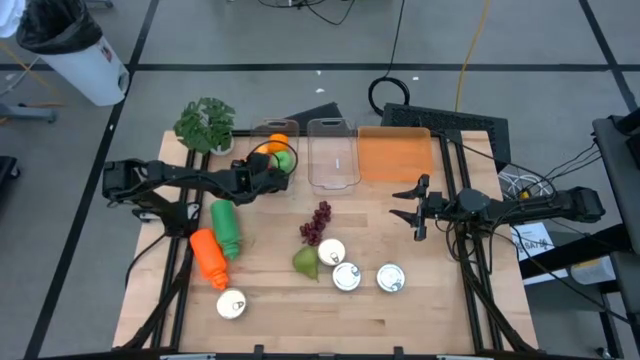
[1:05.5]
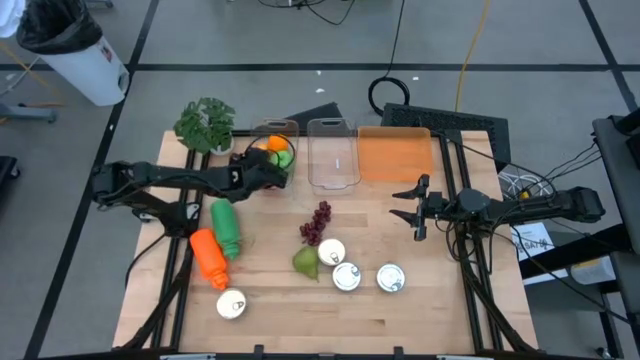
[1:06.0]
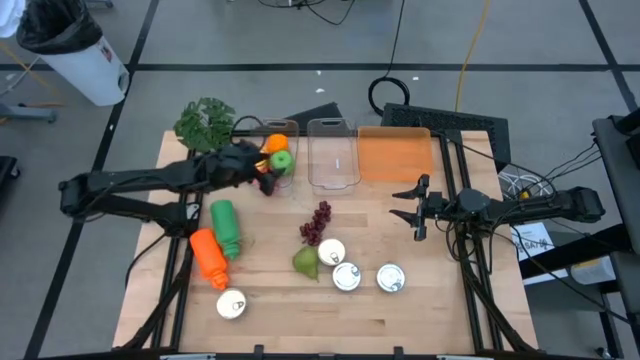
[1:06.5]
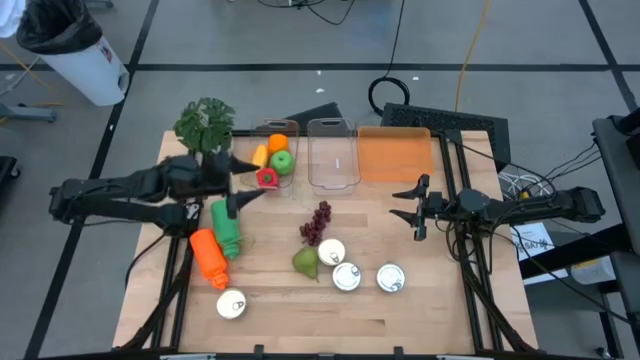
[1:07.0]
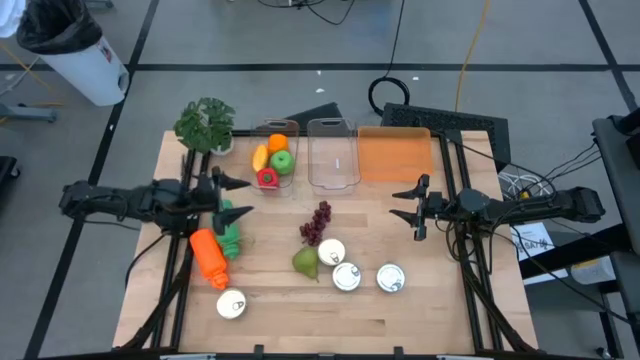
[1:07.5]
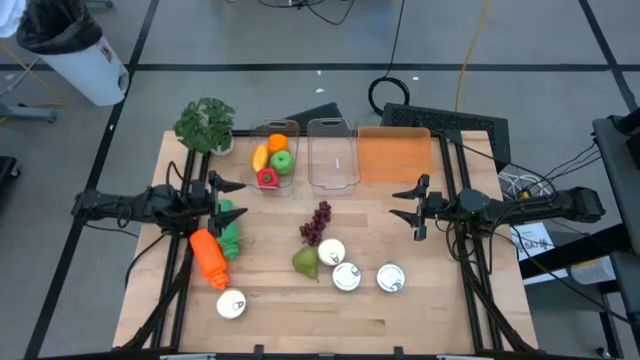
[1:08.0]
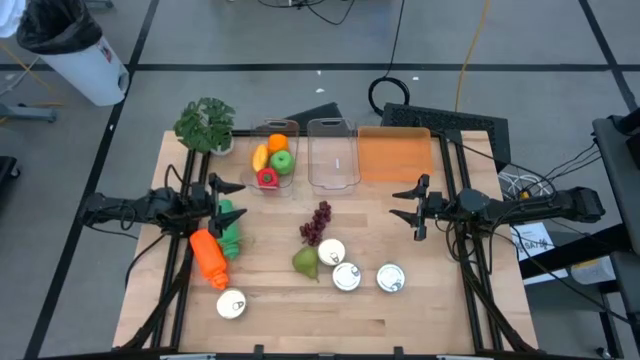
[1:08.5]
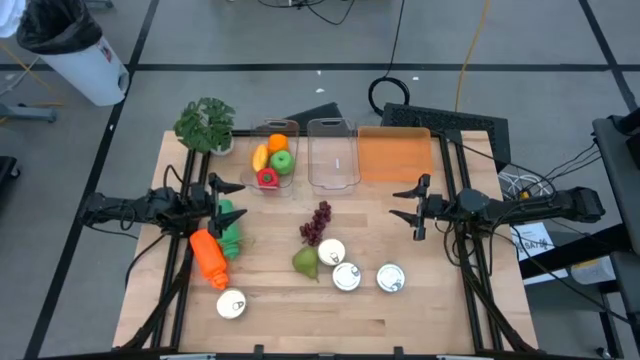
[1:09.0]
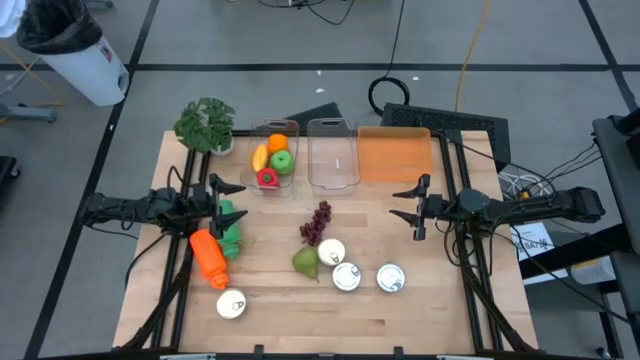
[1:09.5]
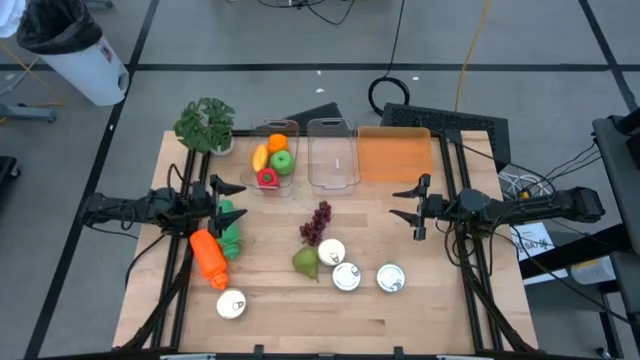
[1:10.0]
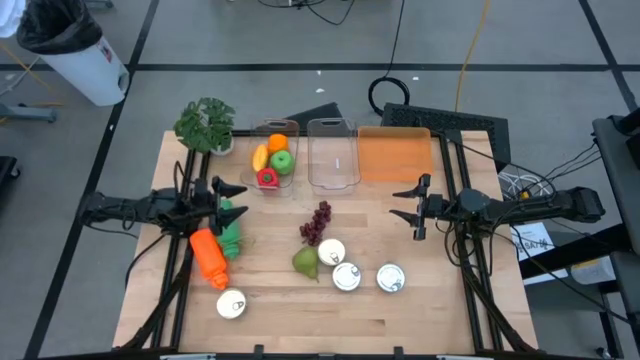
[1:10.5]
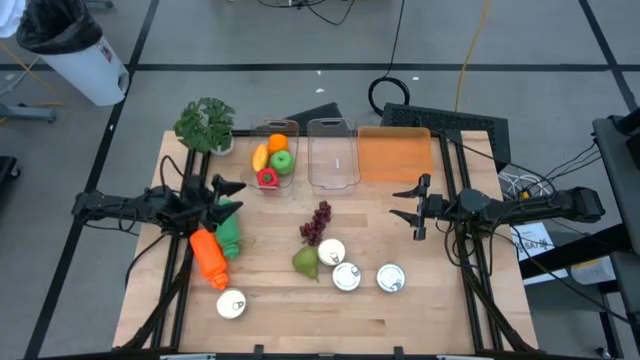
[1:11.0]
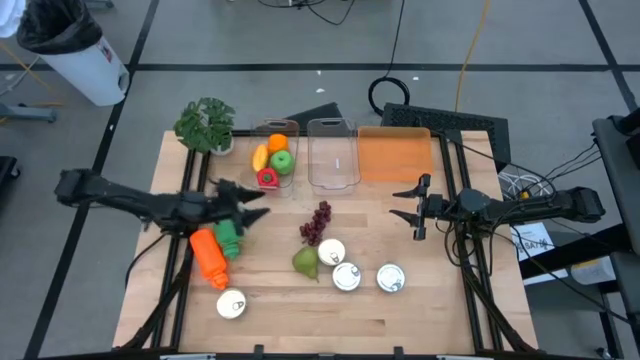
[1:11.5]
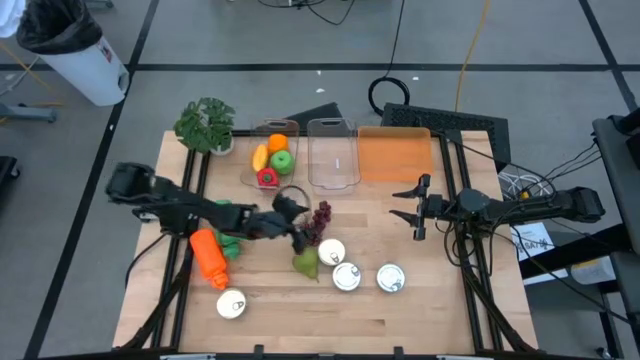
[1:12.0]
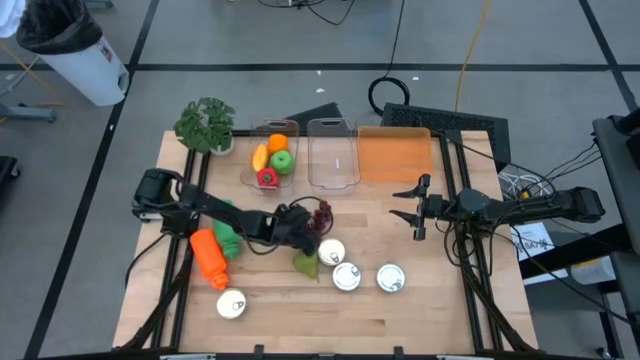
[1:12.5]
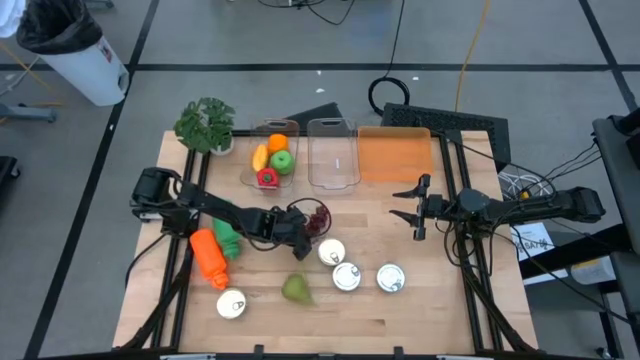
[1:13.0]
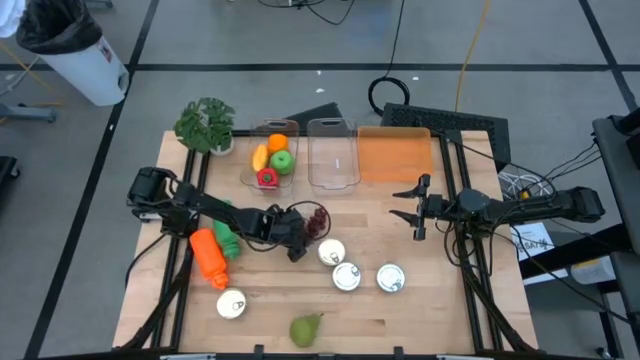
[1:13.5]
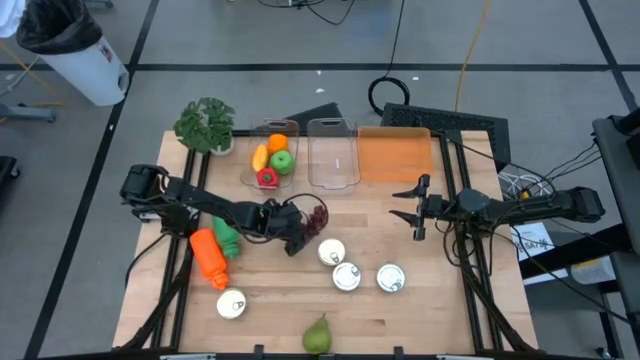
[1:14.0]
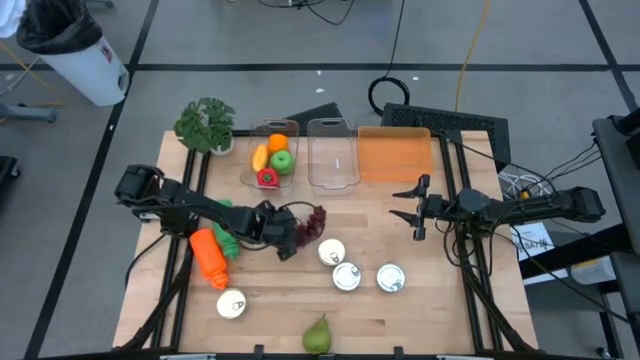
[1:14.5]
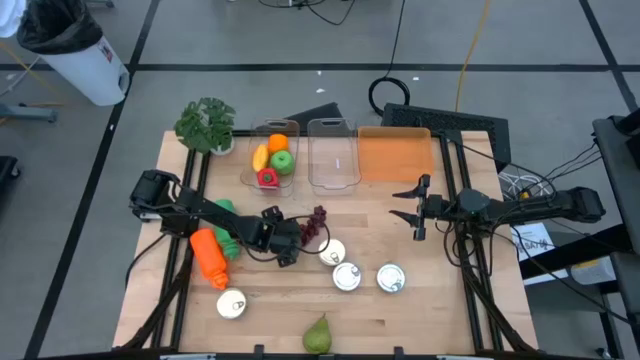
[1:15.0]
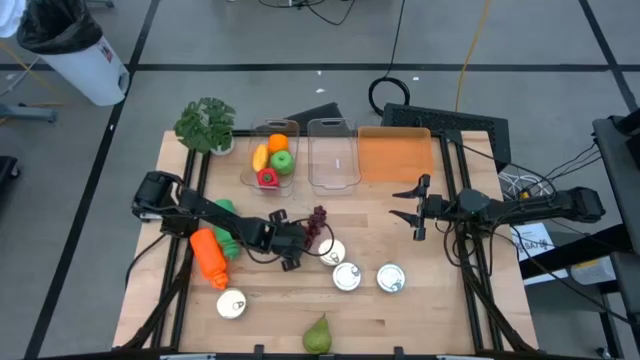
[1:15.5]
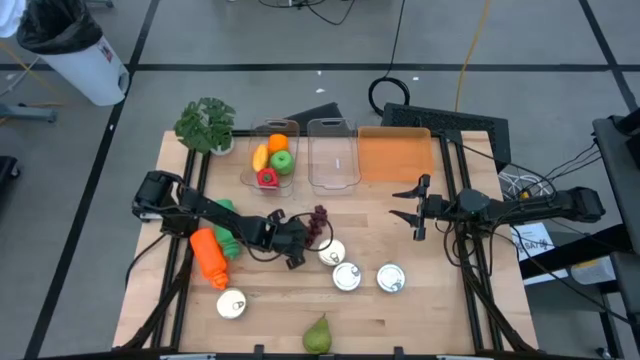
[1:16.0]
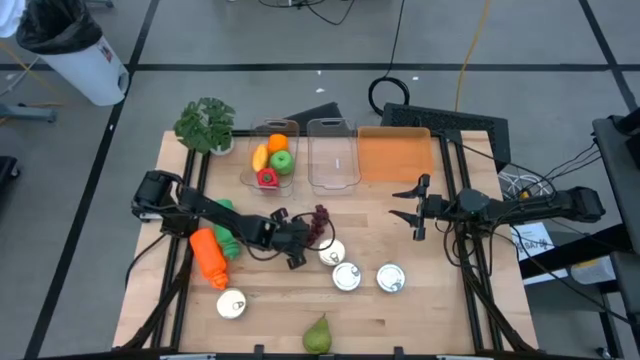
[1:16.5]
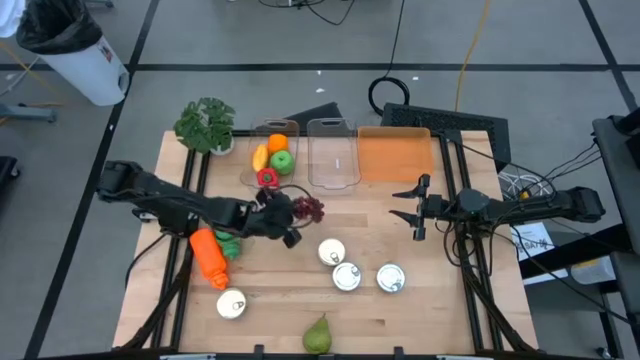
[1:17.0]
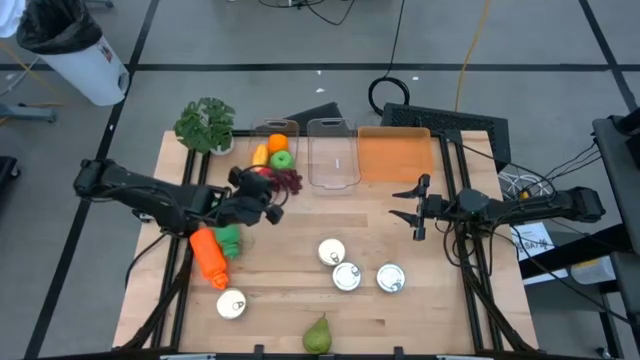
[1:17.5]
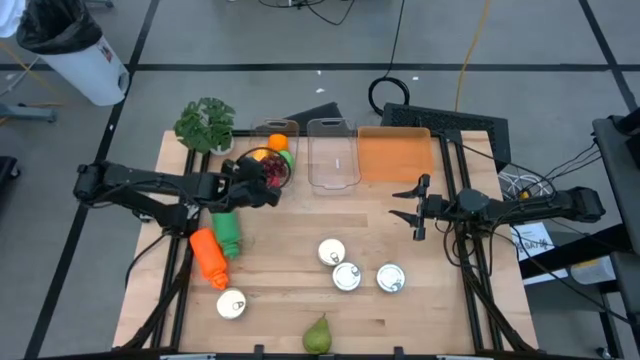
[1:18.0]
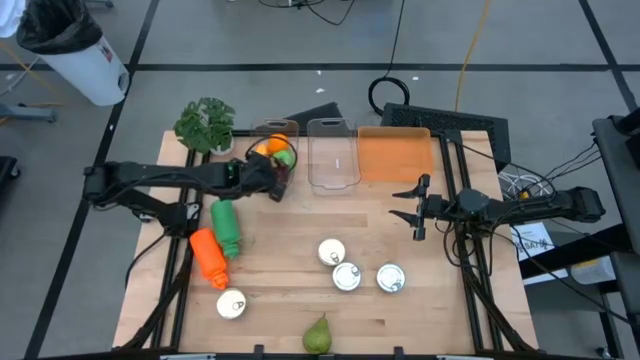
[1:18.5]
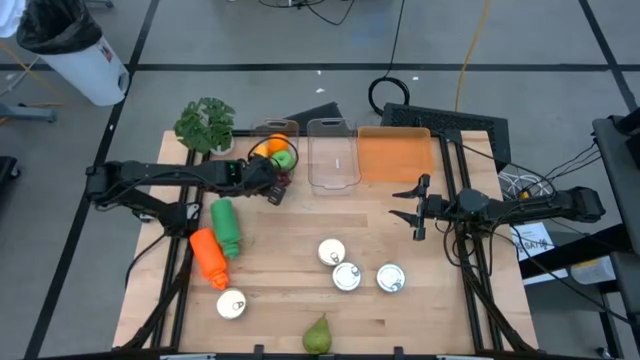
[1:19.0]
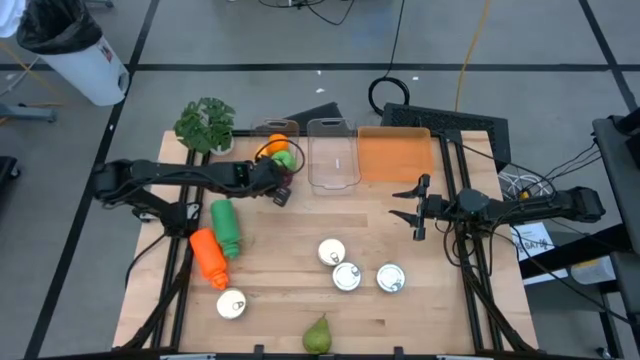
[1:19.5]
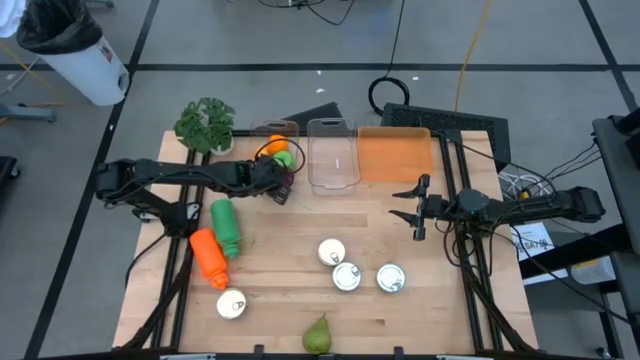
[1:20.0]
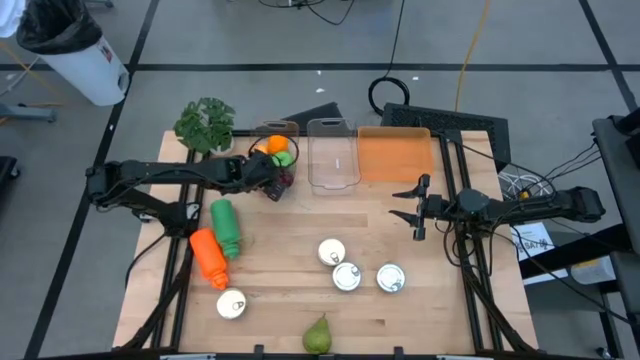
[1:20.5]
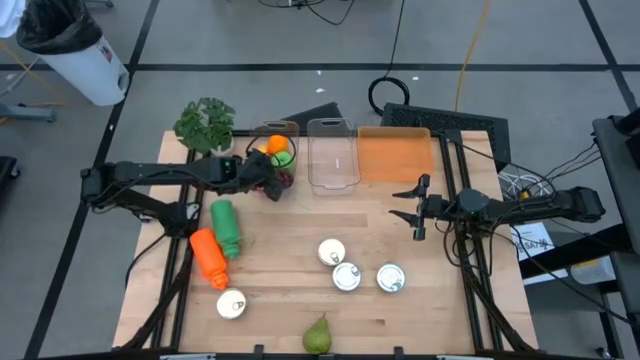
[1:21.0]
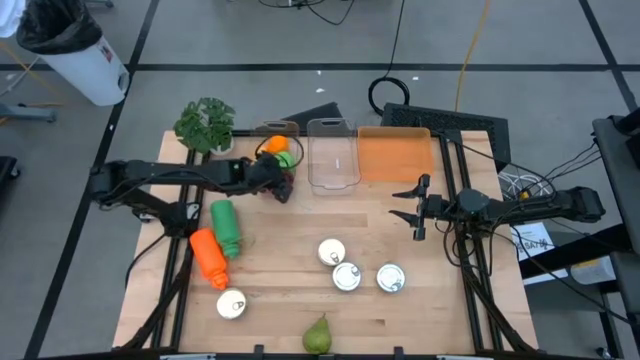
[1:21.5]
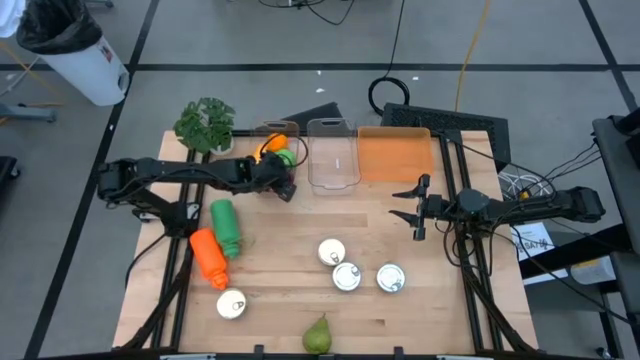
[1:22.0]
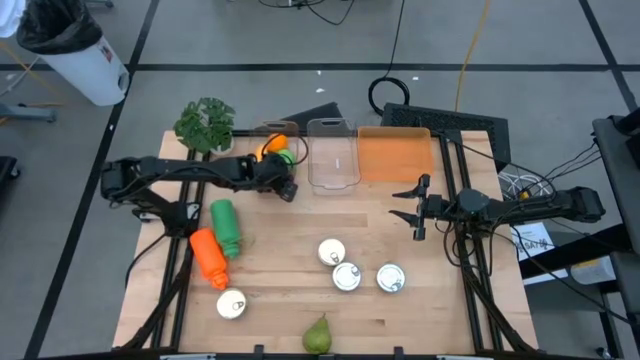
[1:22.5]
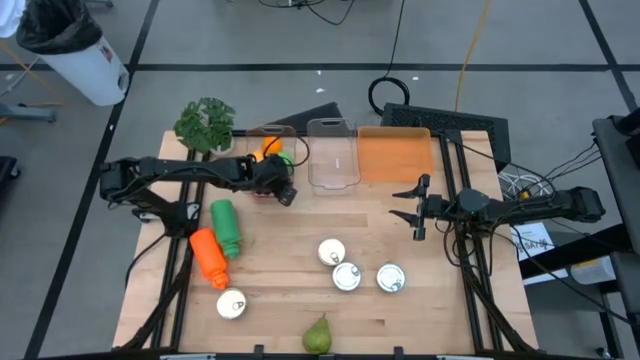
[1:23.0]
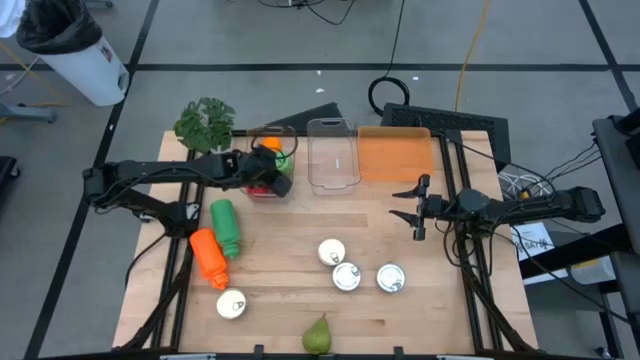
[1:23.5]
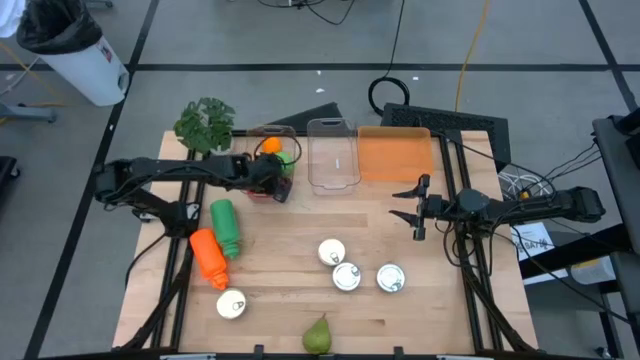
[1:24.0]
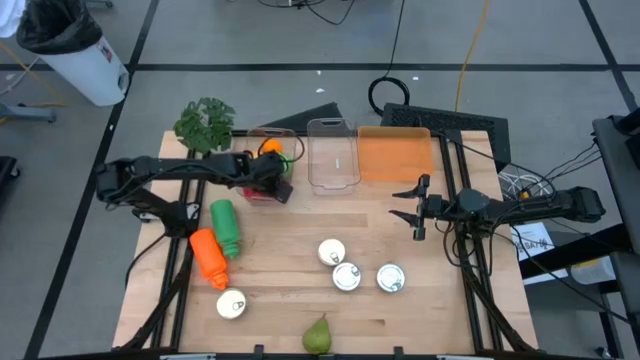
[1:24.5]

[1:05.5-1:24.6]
Task: Pick & Place Food Item
Put the red grapes into the left transparent bin
